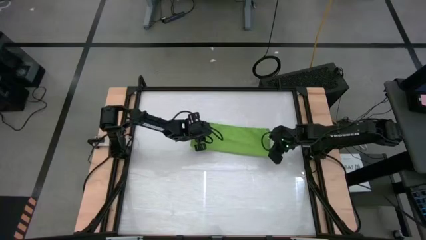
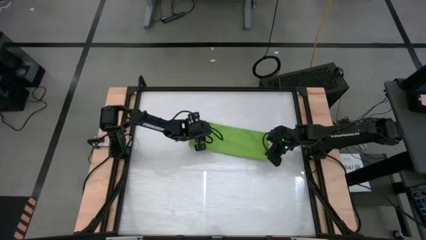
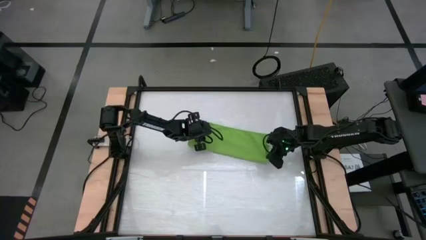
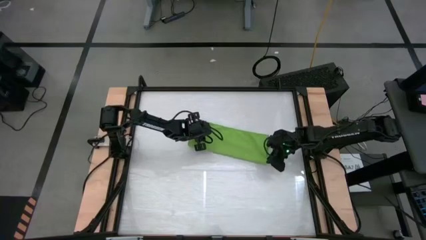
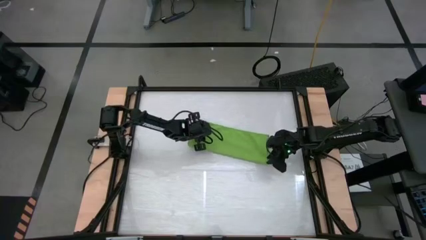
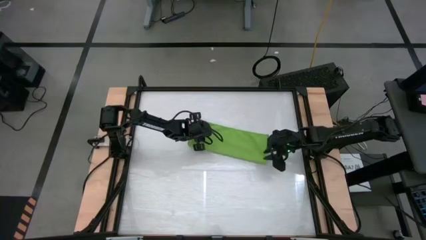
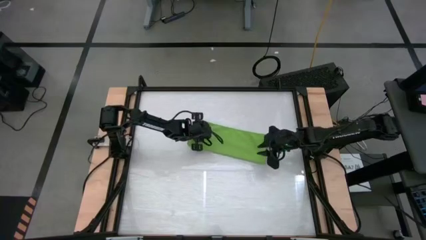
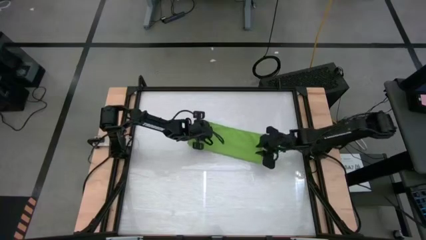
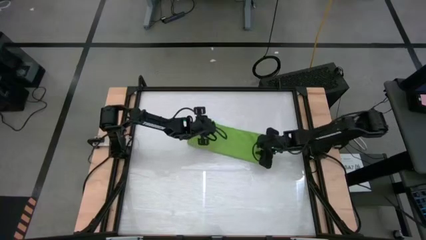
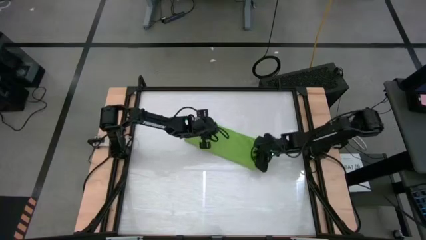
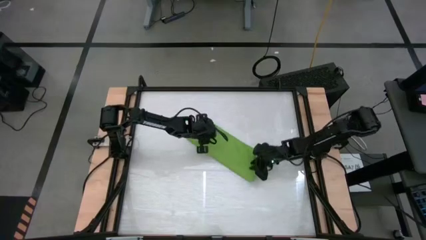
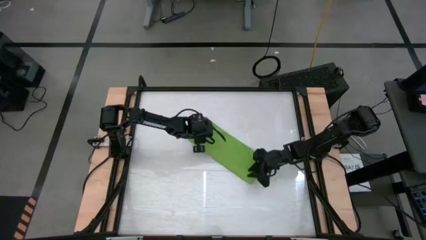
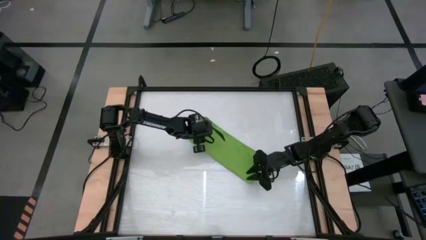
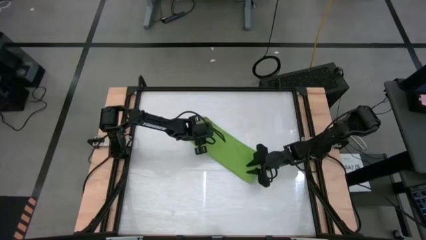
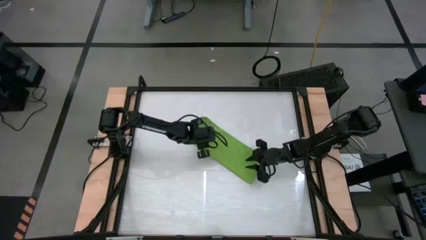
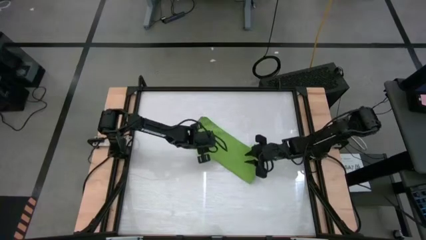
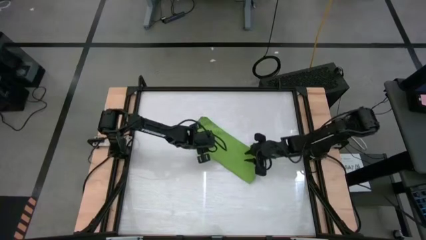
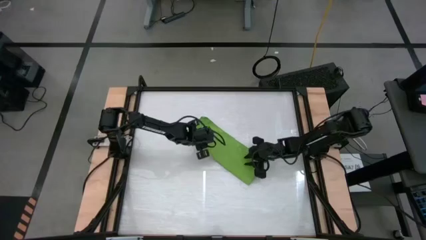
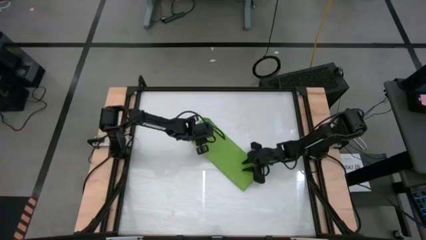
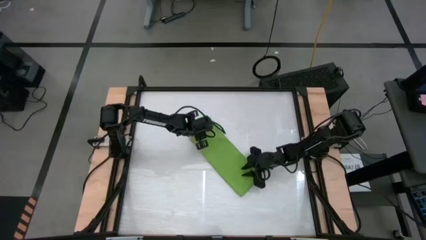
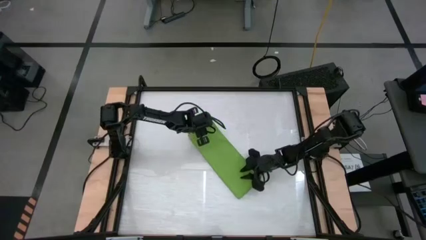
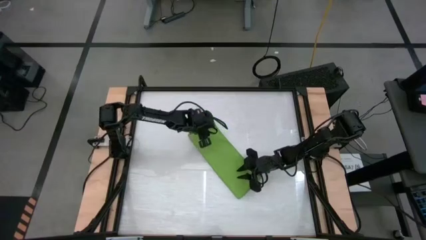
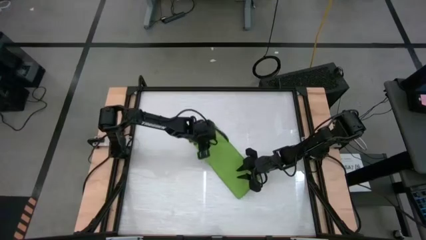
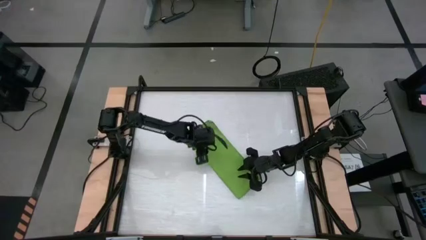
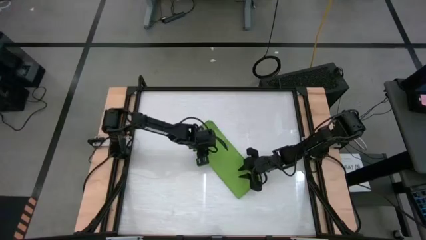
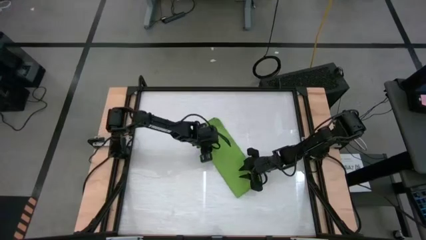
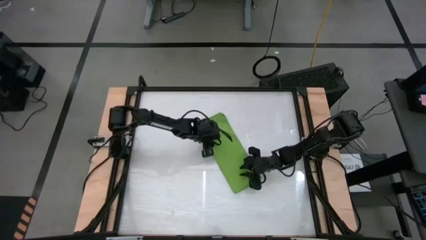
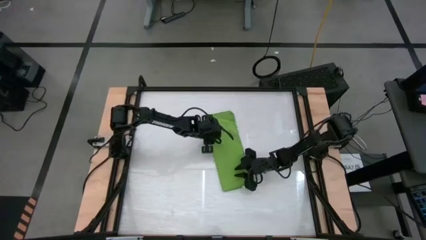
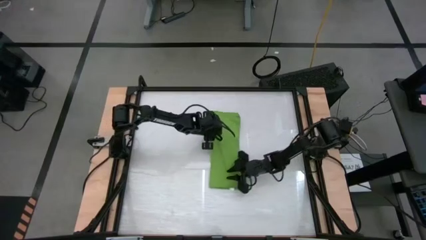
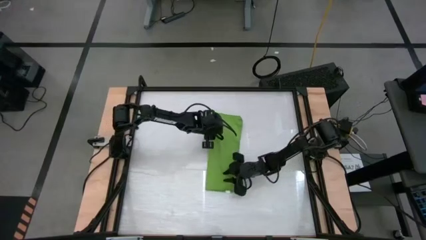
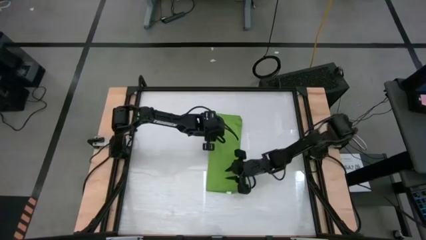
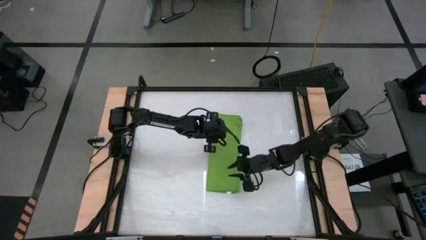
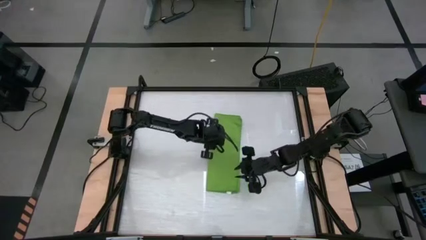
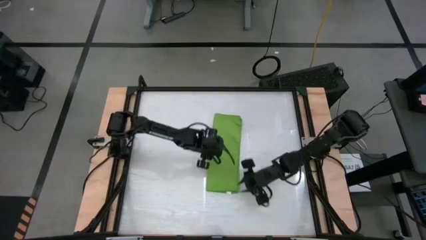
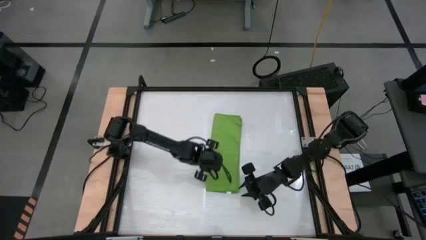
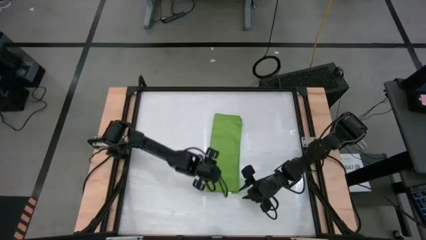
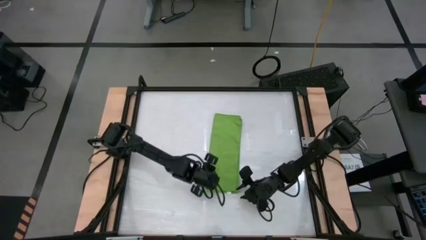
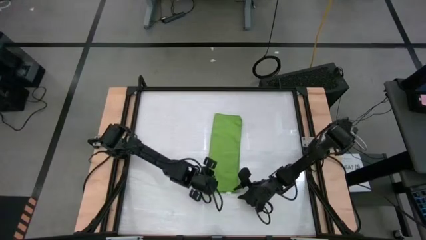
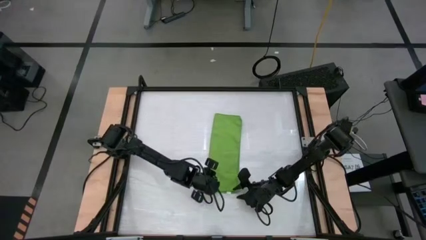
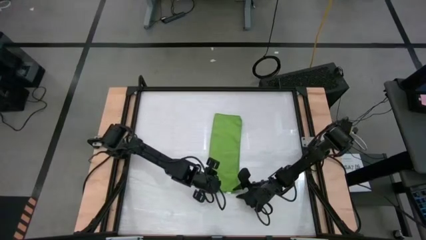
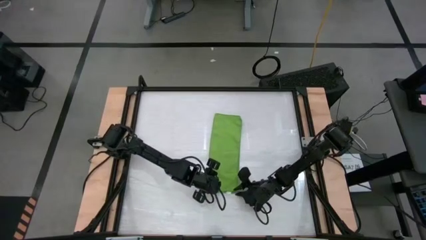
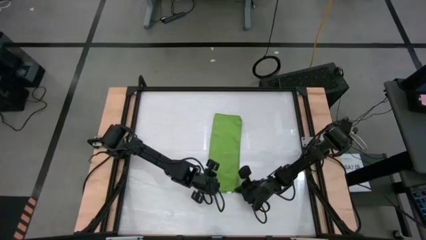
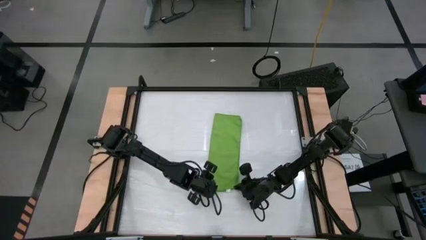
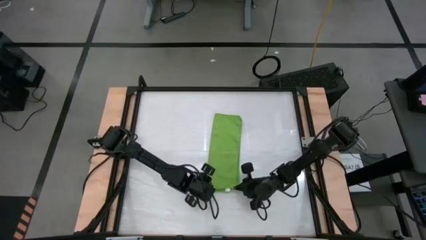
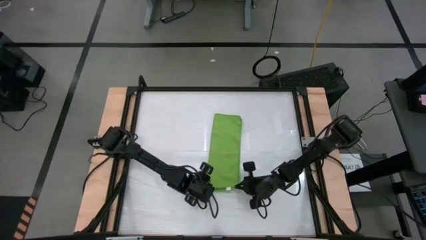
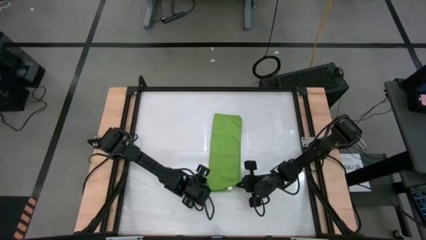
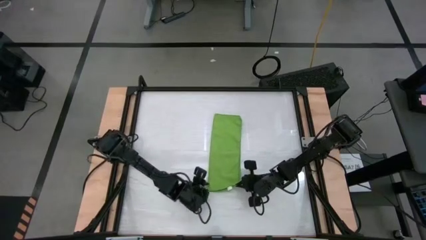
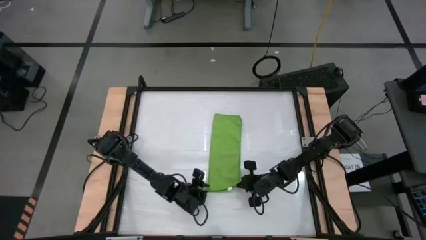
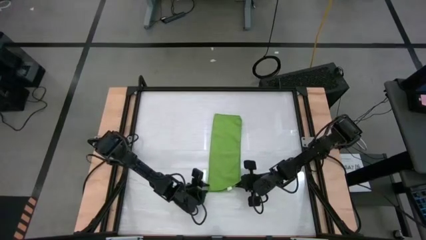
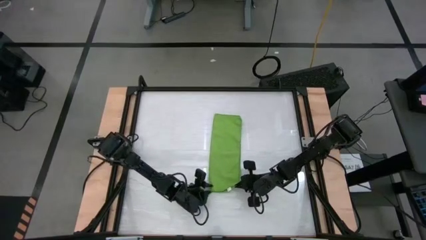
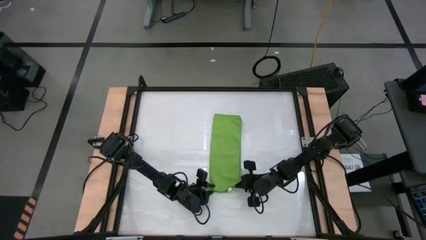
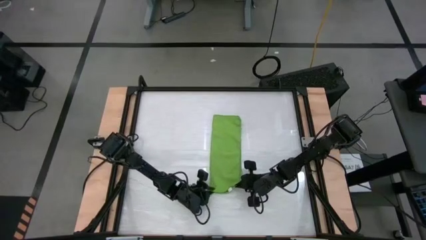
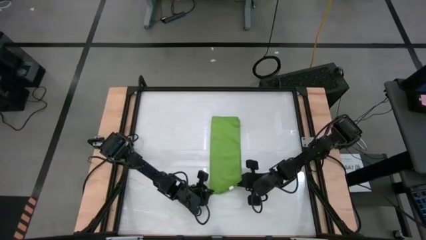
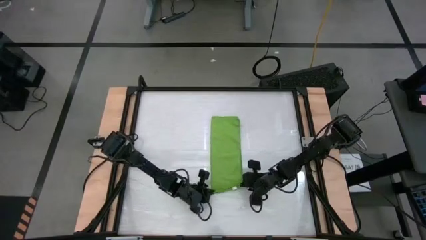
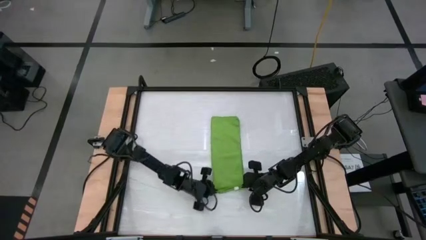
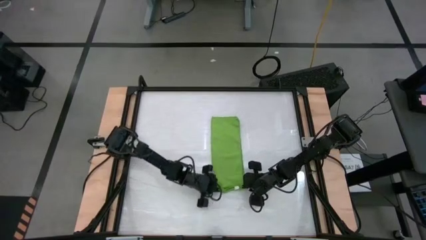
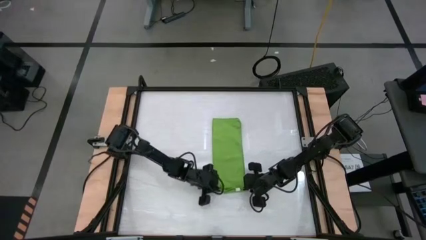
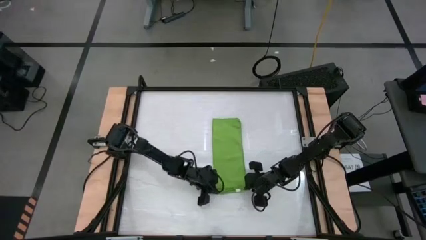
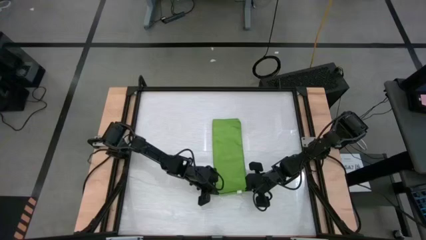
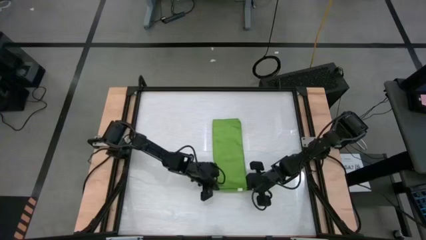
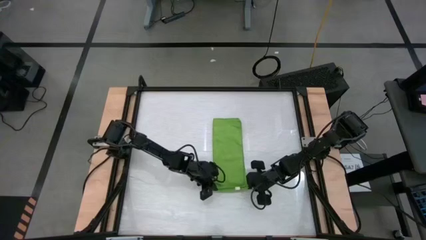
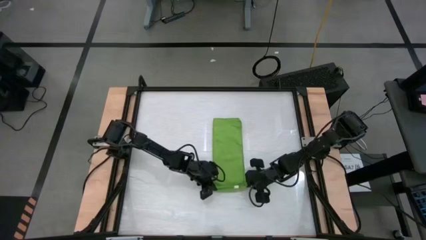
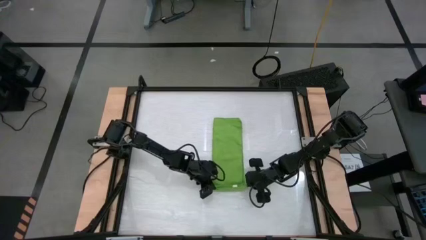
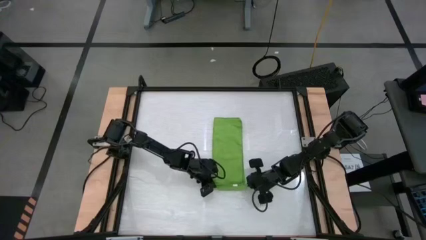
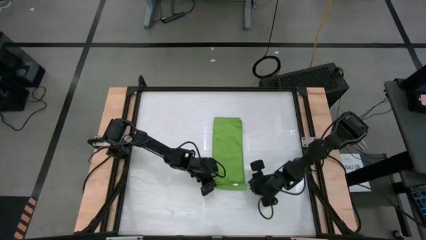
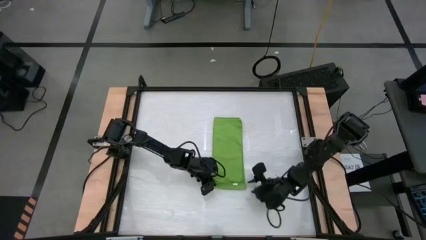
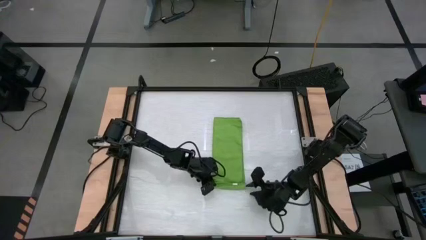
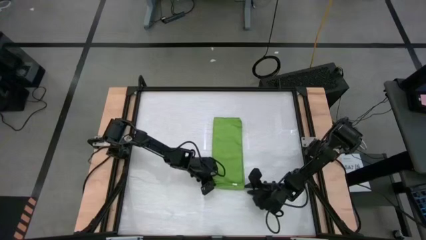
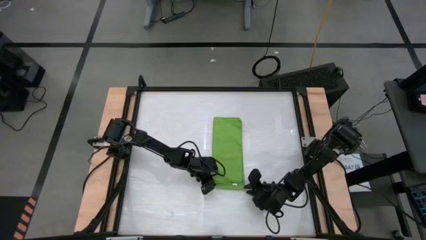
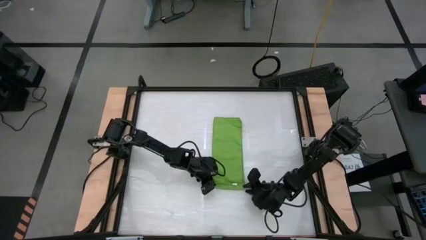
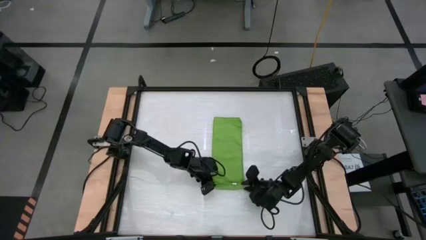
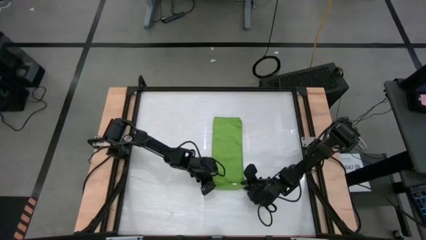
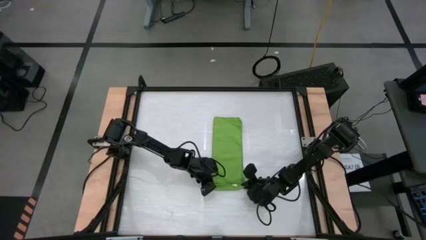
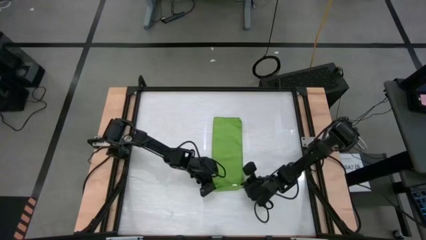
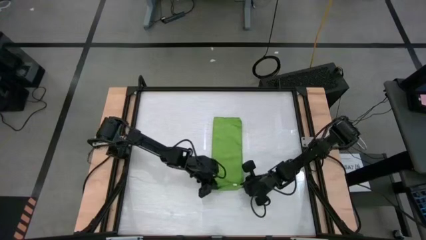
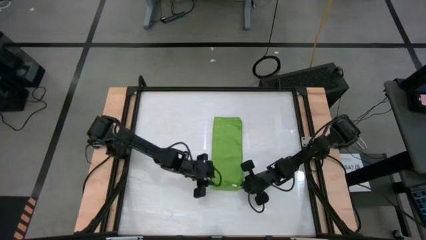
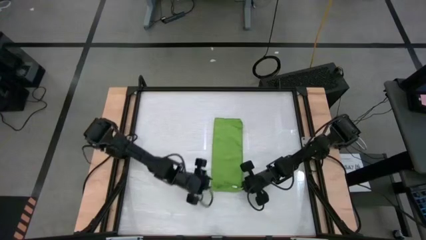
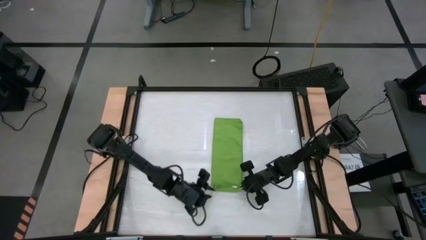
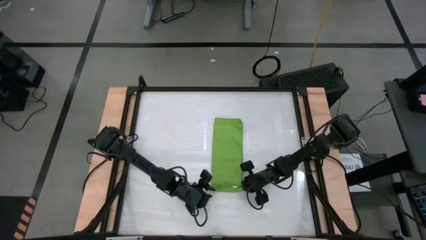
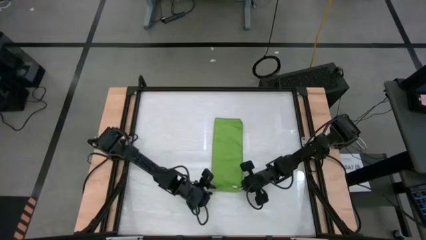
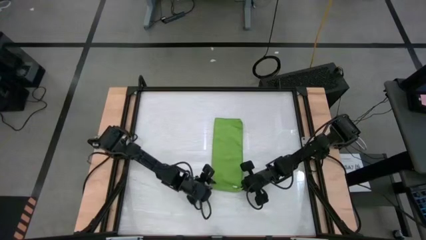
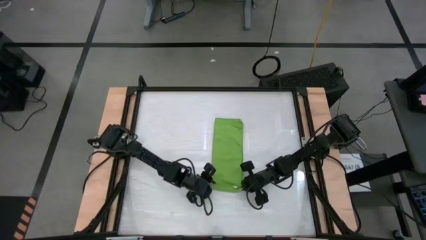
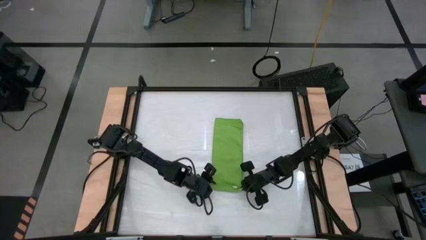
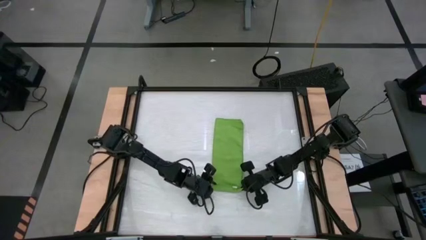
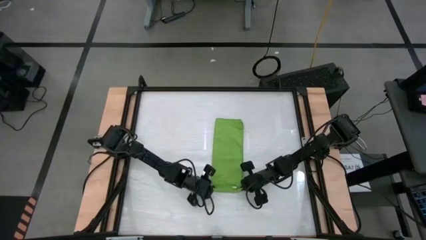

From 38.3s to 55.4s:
Task: Roll towel
Roll the green microfiber cloth
